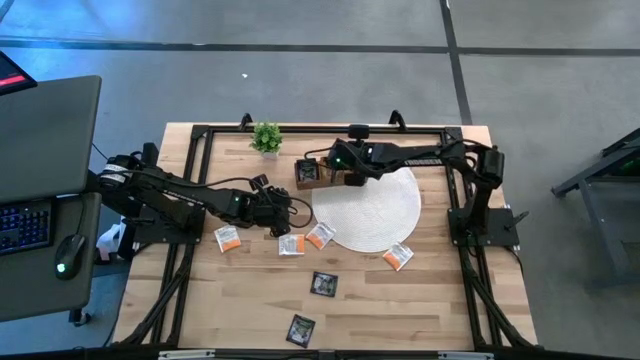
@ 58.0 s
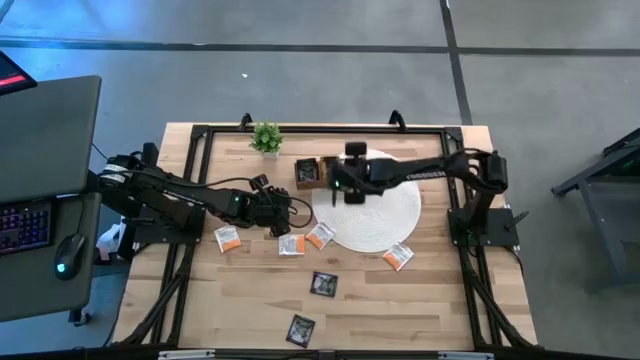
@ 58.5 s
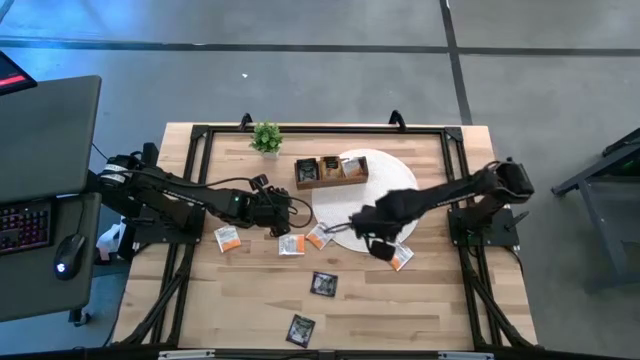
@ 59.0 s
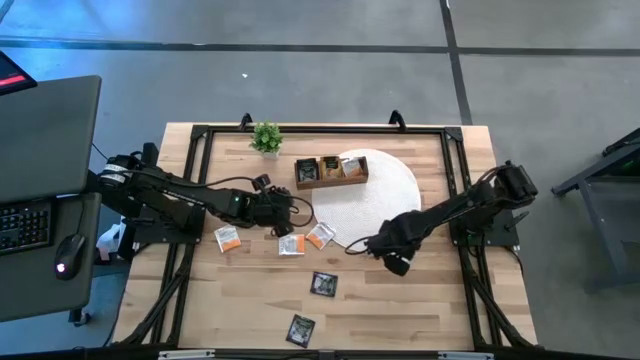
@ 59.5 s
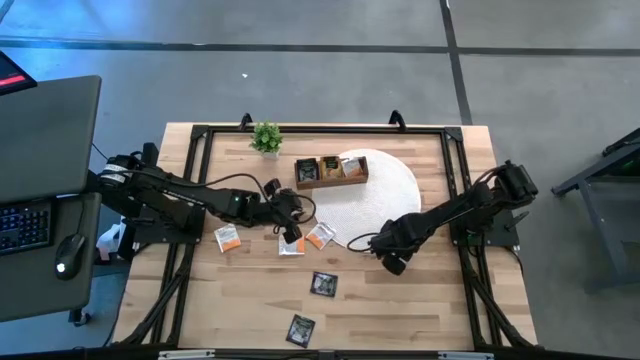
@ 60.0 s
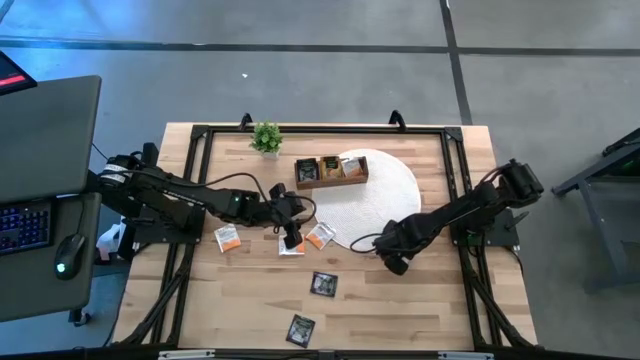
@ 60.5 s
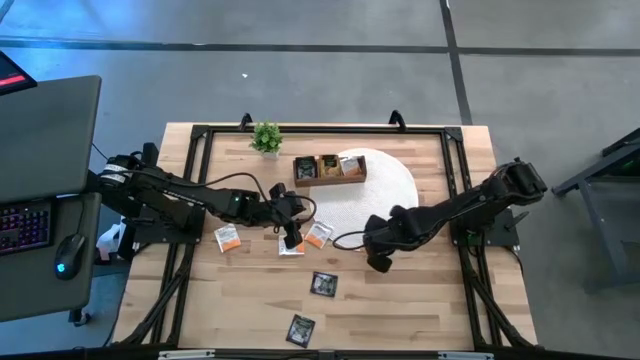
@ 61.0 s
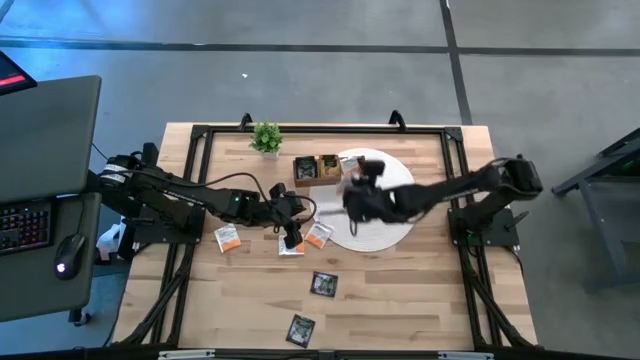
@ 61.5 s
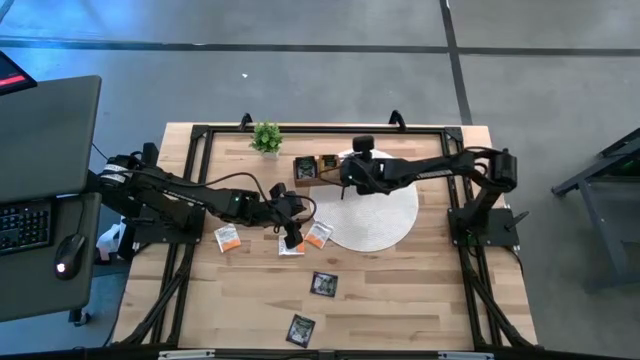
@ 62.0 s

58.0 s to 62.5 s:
Task: Pick & Place Tea
Put the white tea bag into the right section of the wooden organizer

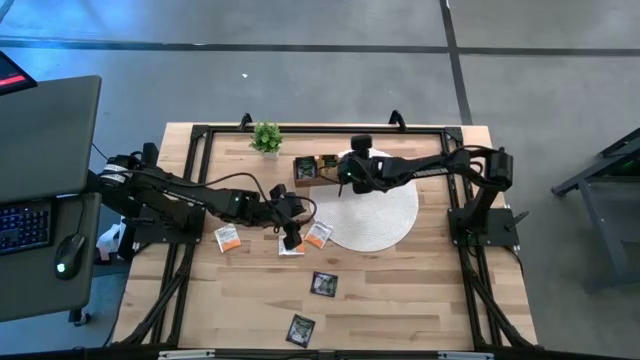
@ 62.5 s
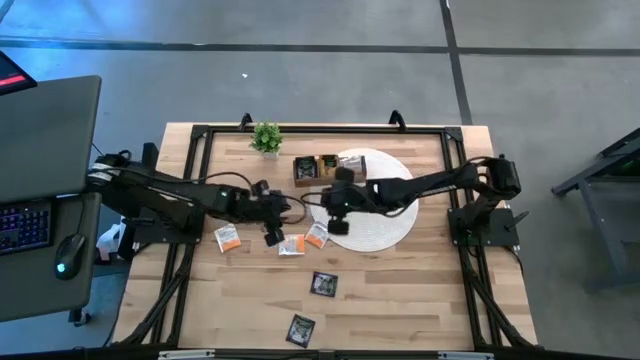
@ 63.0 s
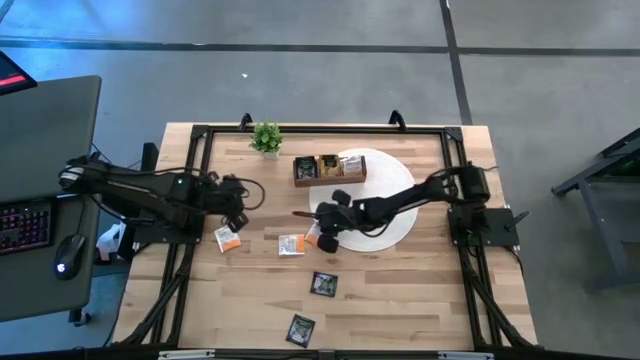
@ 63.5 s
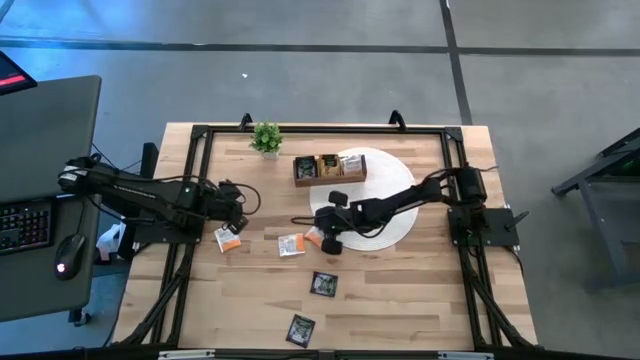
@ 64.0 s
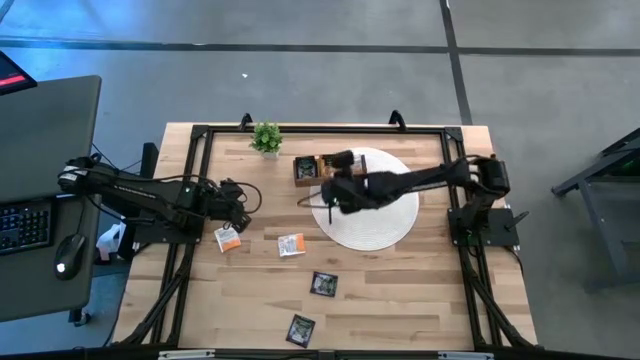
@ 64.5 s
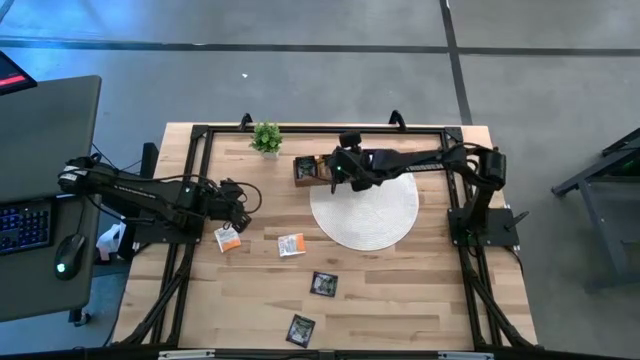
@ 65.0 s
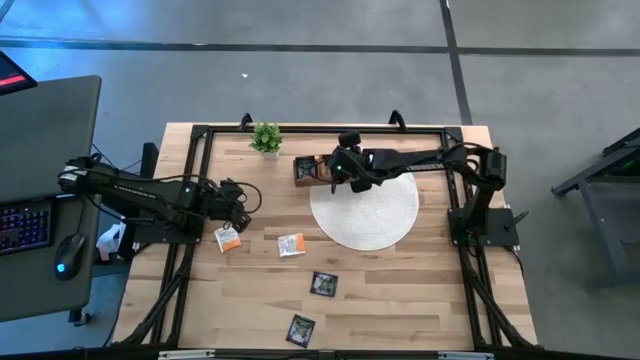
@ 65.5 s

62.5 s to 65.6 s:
Put the white tea bag into the right section of the wooden organizer

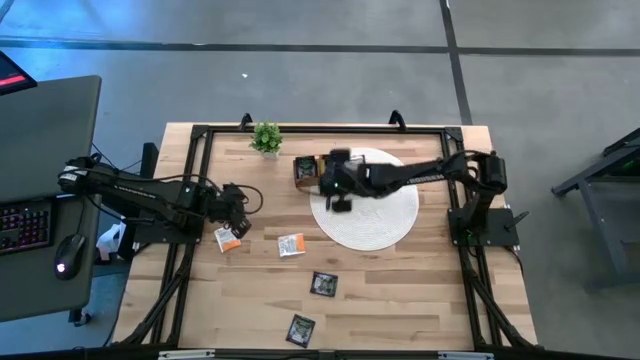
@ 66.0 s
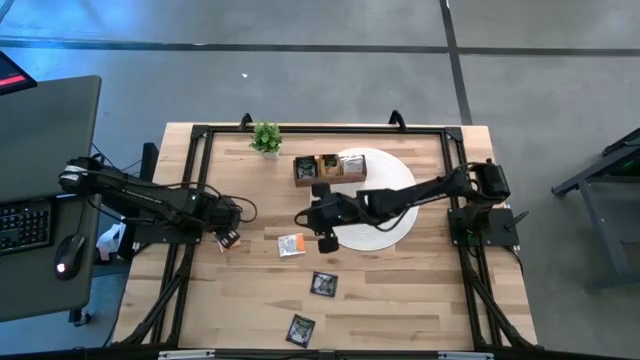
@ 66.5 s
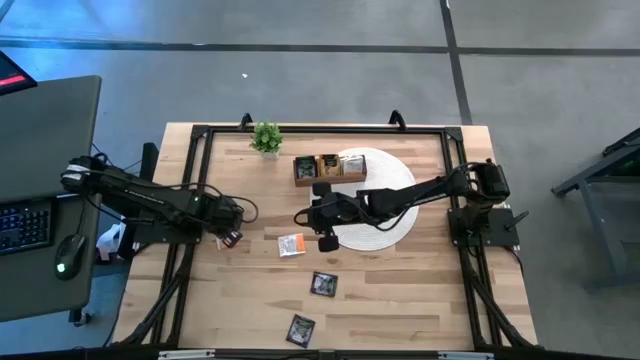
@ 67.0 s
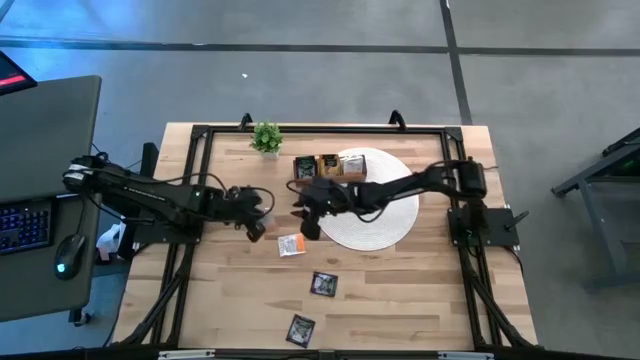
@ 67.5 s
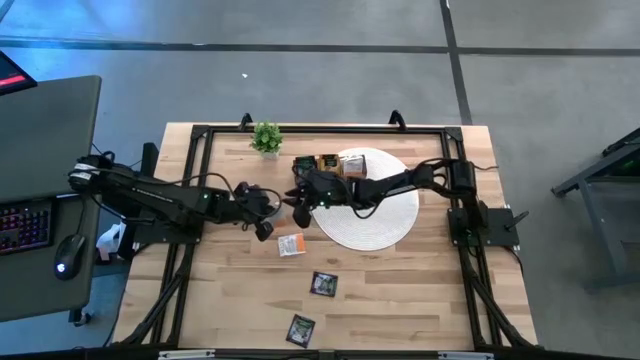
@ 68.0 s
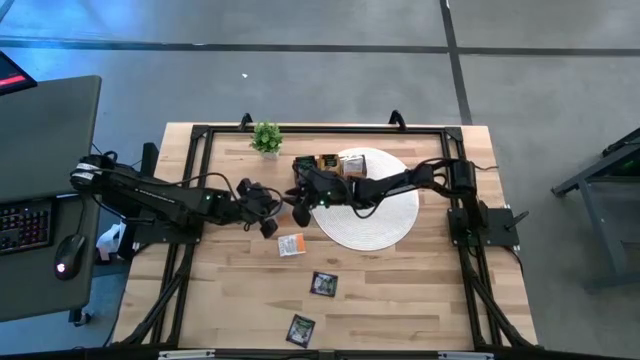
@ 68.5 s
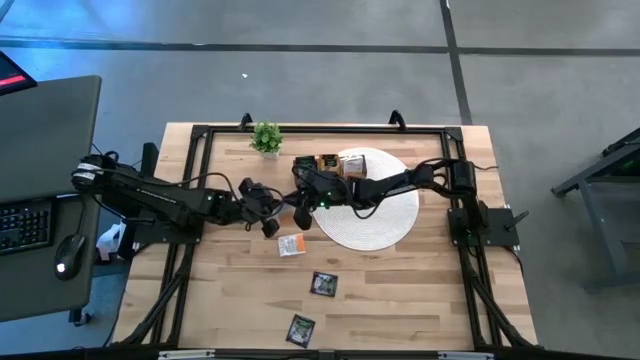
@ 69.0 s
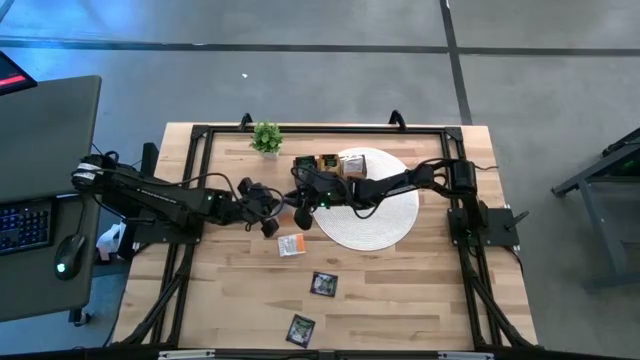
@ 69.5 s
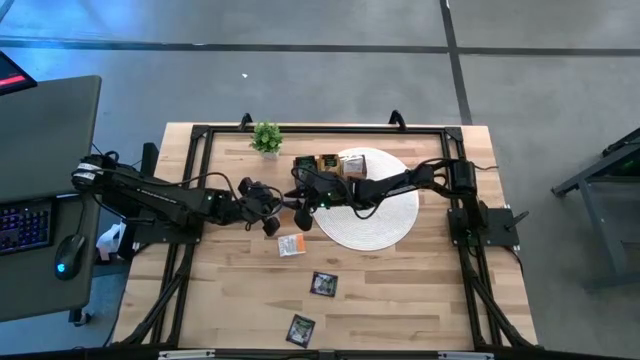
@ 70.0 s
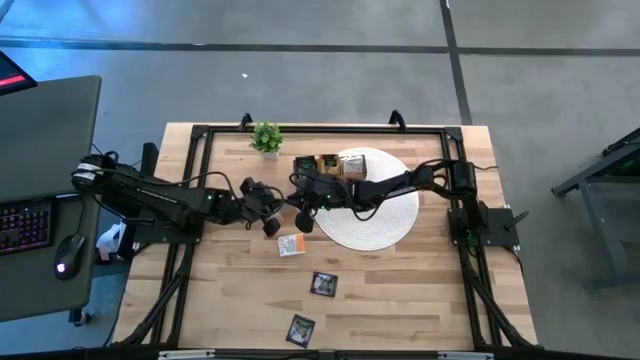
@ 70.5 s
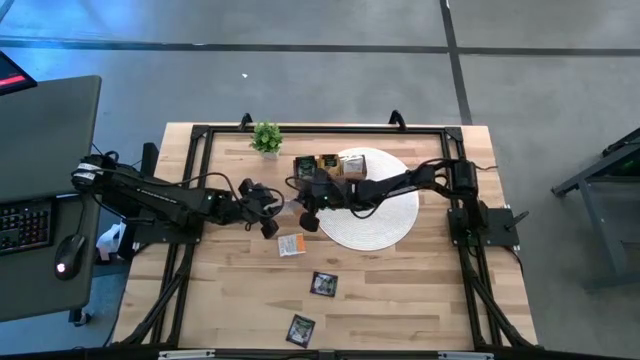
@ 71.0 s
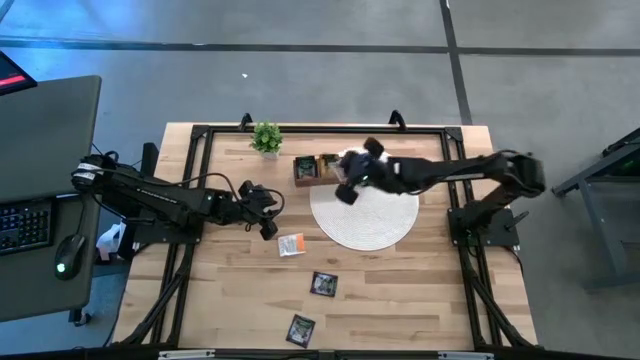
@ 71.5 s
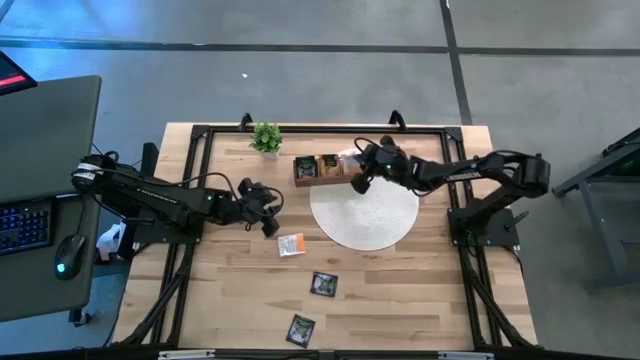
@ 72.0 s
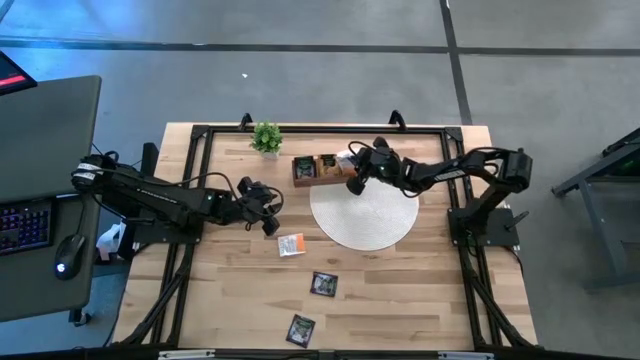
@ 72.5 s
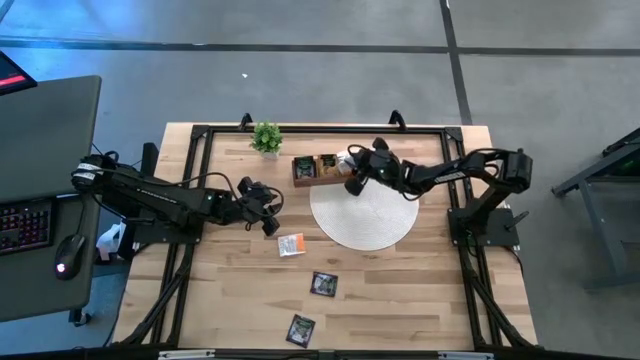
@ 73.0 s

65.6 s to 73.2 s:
Put the white tea bag into the right section of the wooden organizer

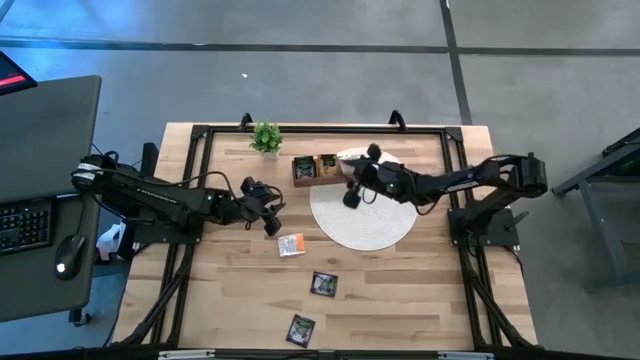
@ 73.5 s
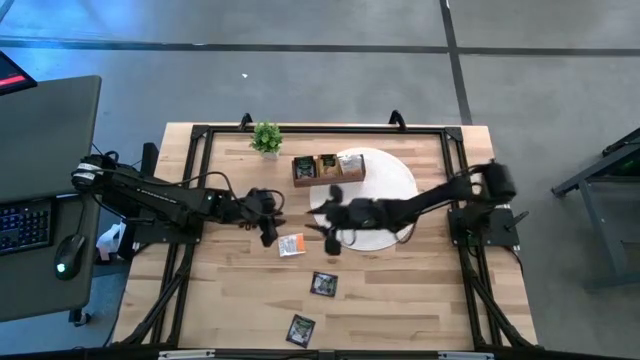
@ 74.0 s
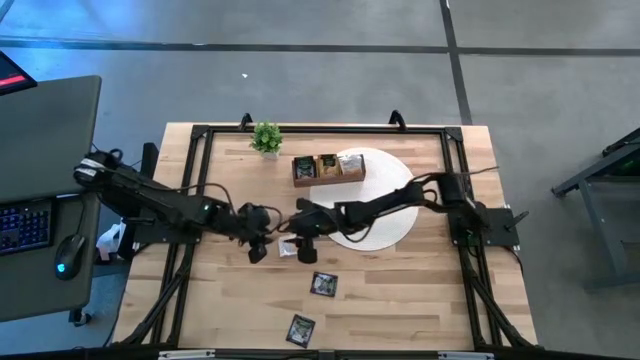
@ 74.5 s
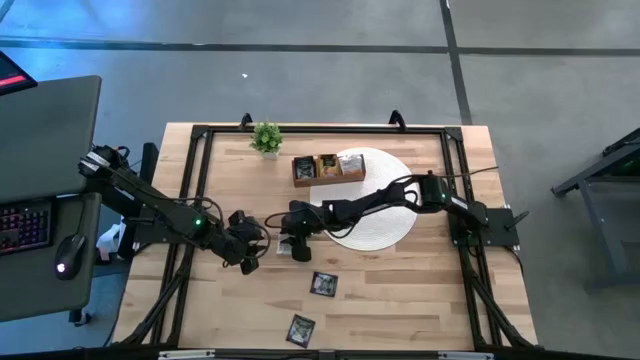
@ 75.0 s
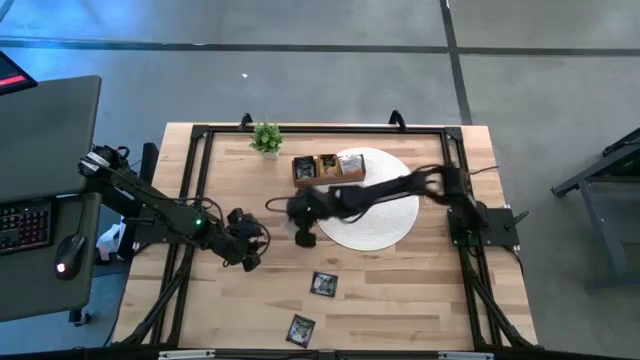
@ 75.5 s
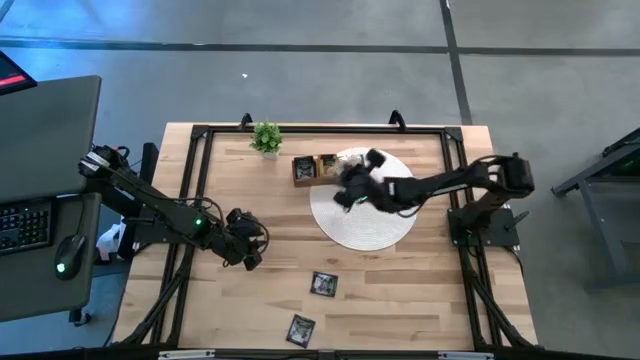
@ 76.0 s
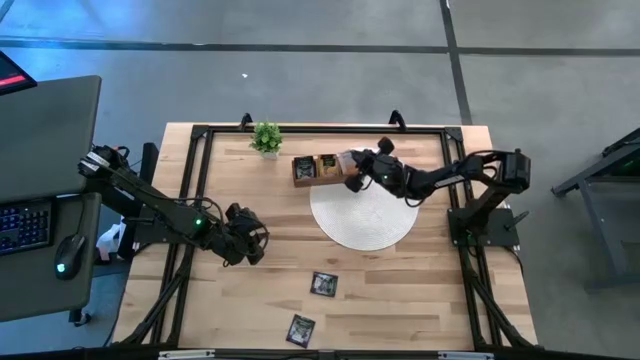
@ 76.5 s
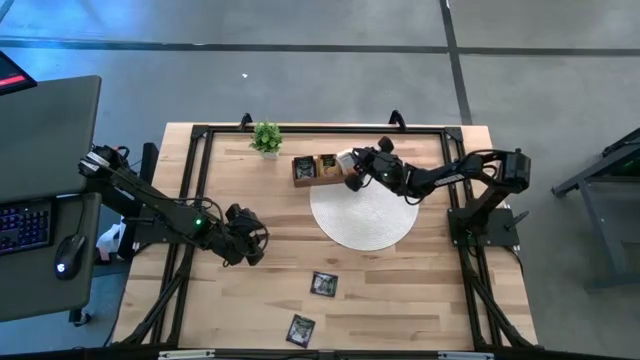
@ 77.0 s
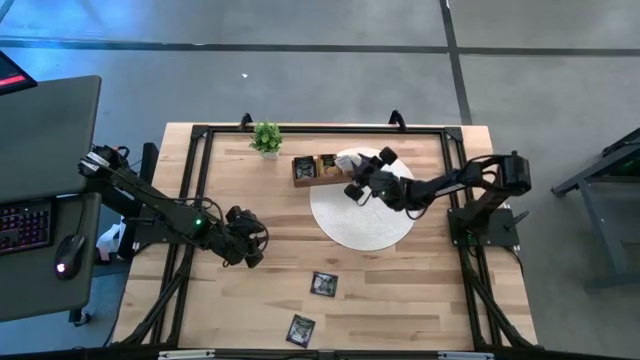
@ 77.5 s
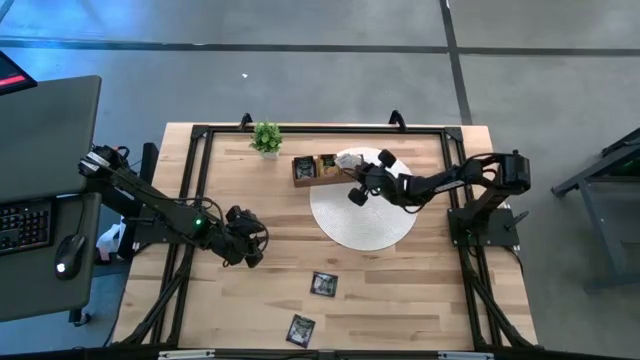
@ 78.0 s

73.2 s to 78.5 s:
Put the white tea bag into the right section of the wooden organizer

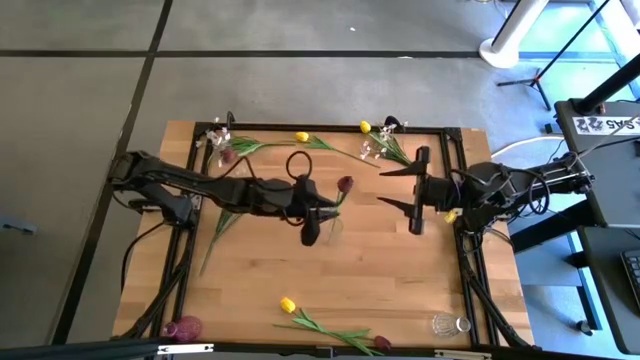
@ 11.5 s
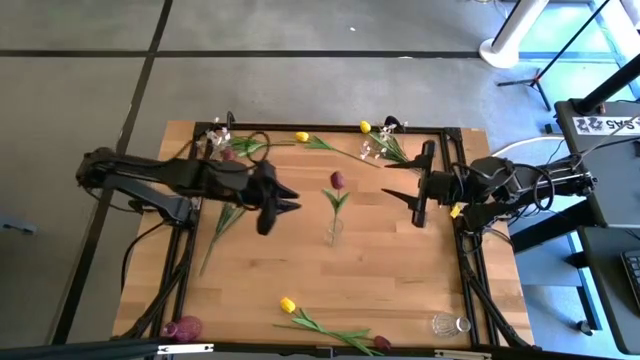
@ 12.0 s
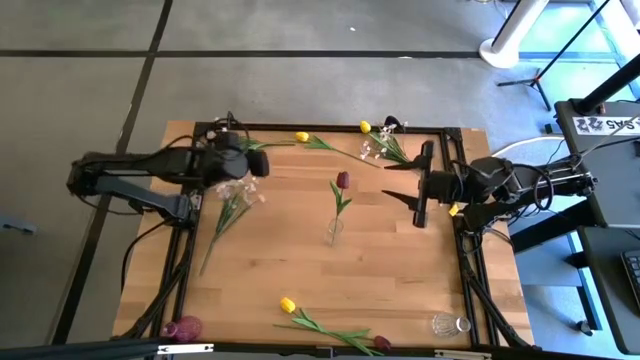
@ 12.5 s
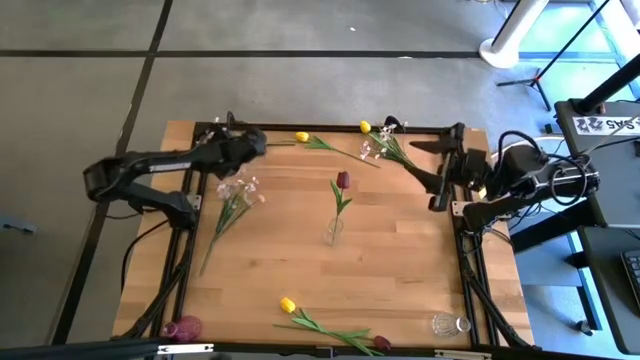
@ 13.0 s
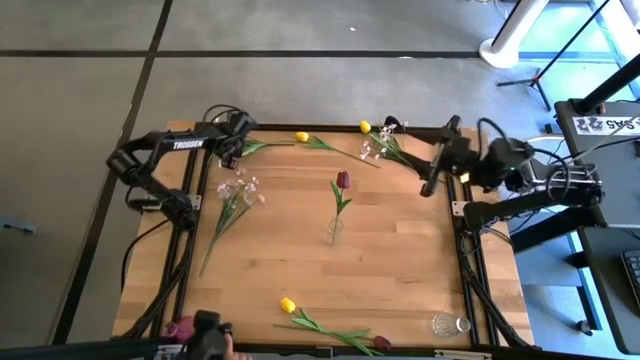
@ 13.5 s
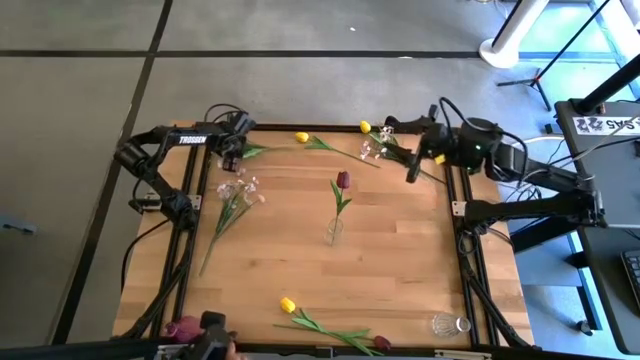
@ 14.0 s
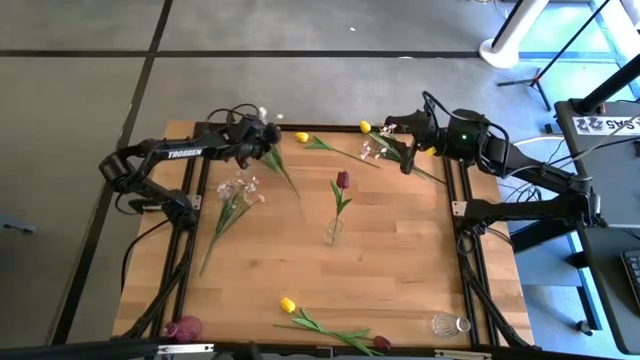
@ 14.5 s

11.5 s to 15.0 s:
Task: Sort flowers into vase by color
Put the top red tulip into the top transparent vase
